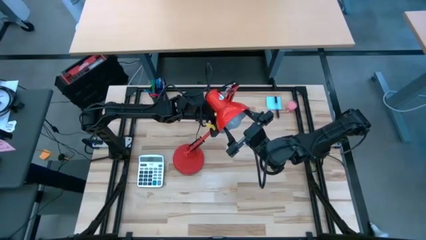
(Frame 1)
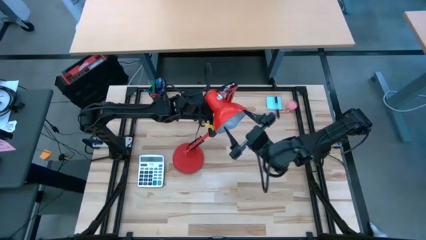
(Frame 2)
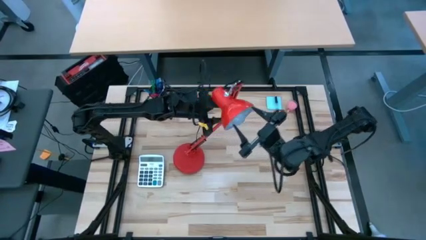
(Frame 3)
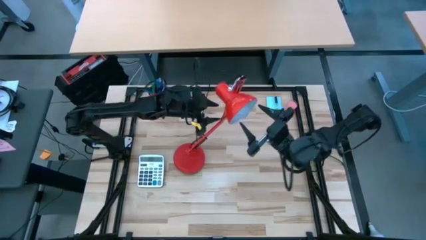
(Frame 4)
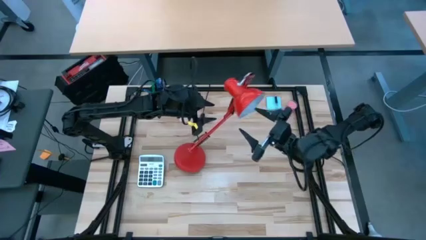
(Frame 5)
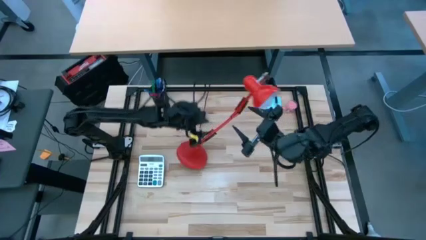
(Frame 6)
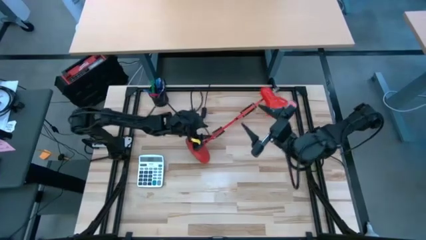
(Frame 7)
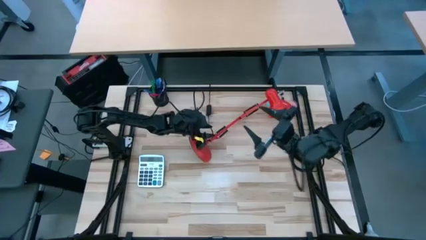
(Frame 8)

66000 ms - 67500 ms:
Task: Screw lightbulb
Insert the white lightbulb into the red desk lamp

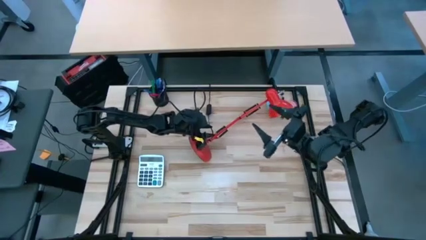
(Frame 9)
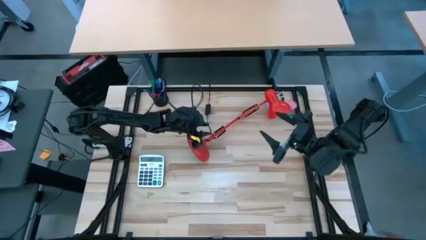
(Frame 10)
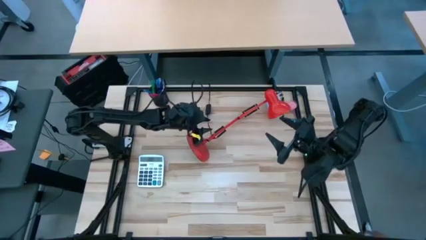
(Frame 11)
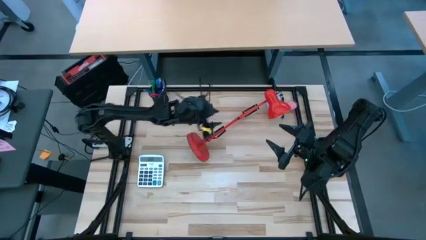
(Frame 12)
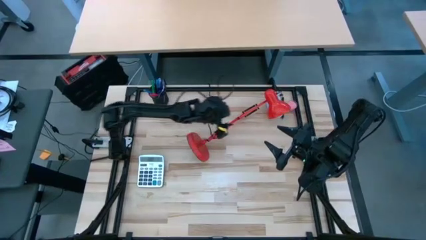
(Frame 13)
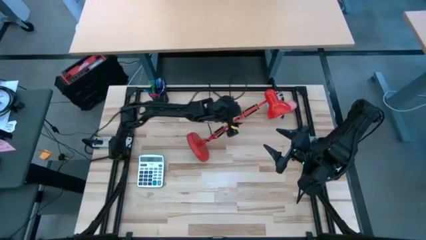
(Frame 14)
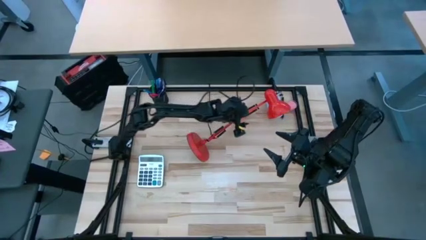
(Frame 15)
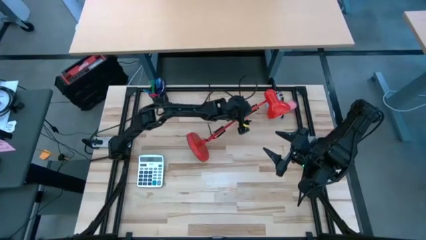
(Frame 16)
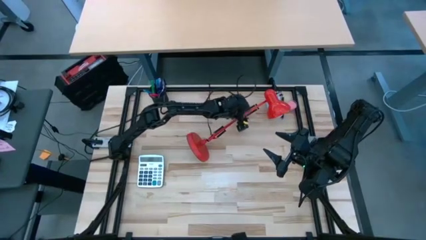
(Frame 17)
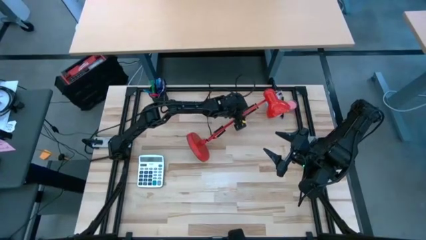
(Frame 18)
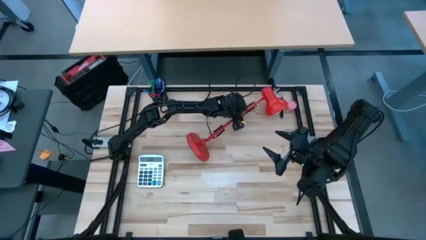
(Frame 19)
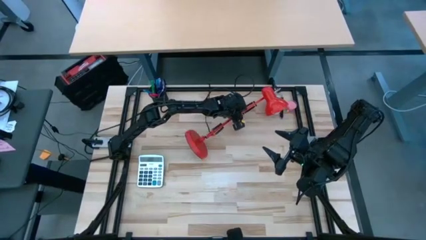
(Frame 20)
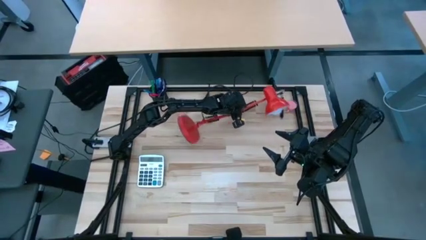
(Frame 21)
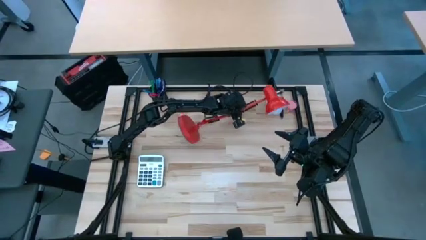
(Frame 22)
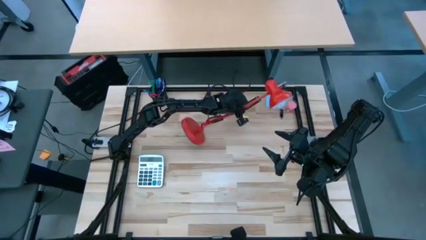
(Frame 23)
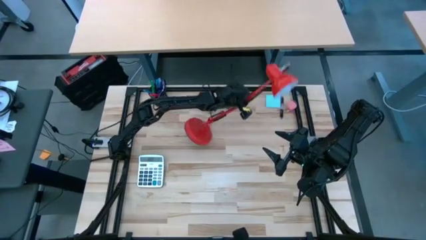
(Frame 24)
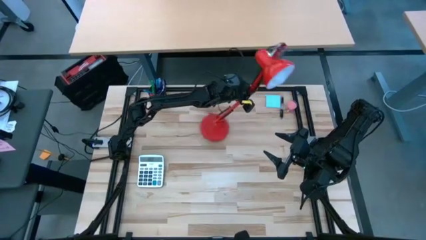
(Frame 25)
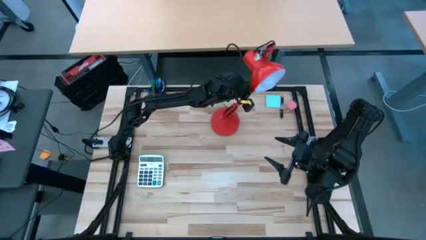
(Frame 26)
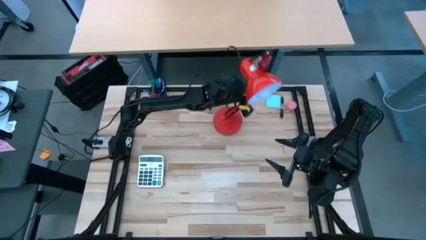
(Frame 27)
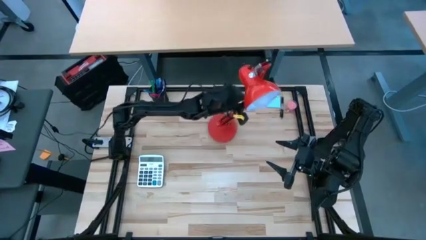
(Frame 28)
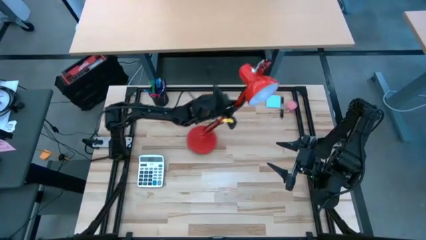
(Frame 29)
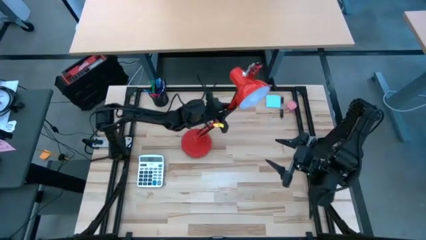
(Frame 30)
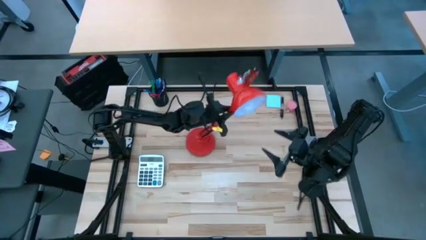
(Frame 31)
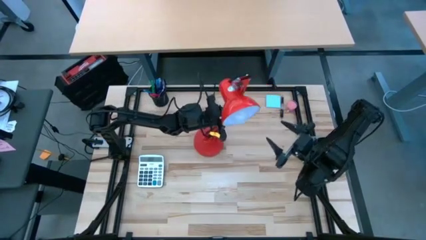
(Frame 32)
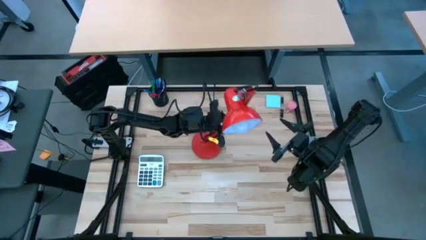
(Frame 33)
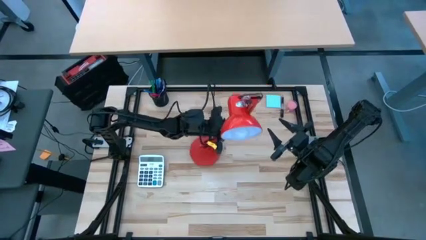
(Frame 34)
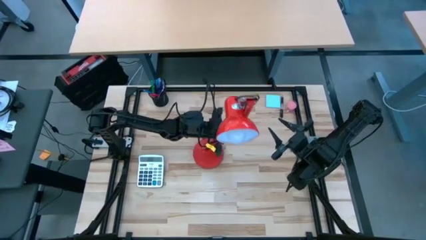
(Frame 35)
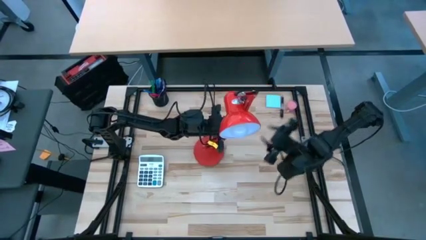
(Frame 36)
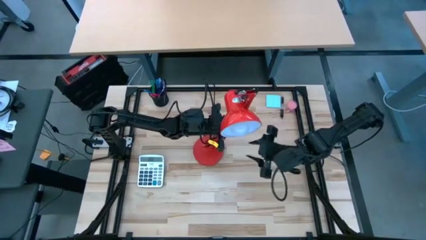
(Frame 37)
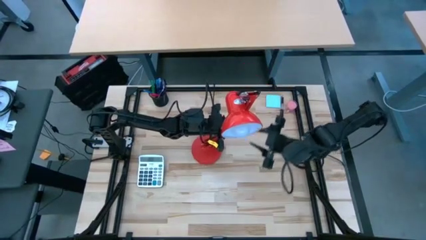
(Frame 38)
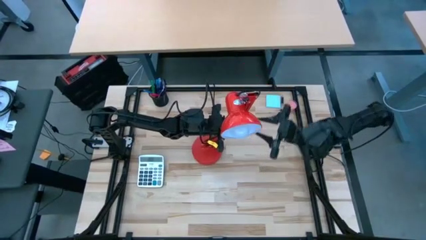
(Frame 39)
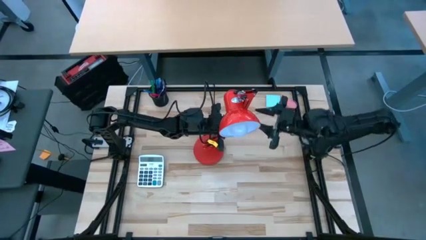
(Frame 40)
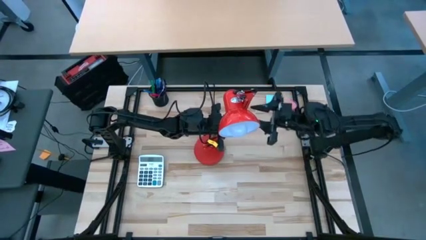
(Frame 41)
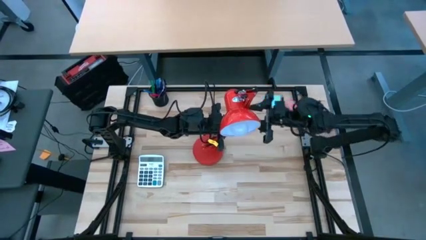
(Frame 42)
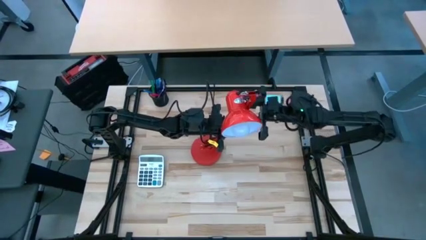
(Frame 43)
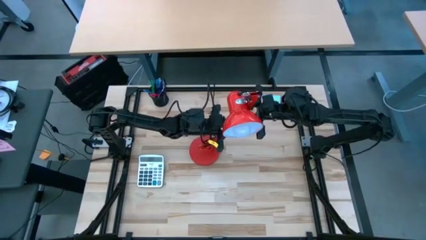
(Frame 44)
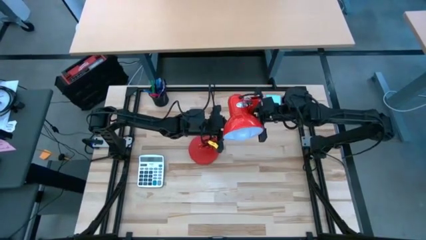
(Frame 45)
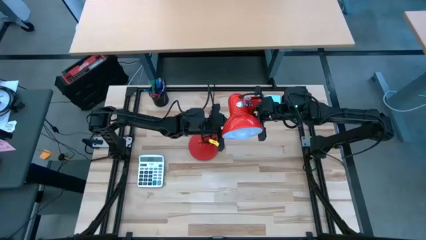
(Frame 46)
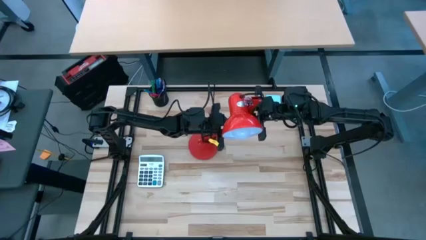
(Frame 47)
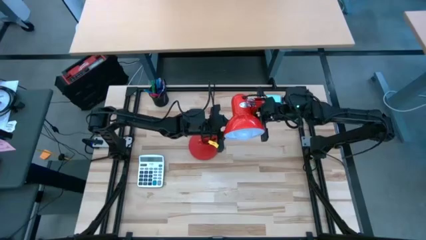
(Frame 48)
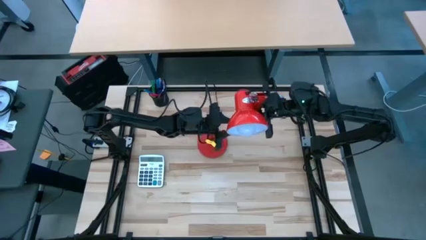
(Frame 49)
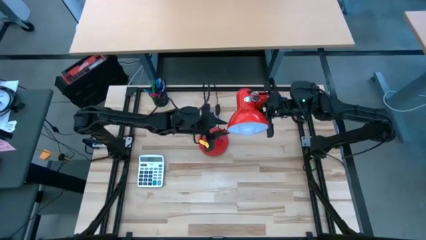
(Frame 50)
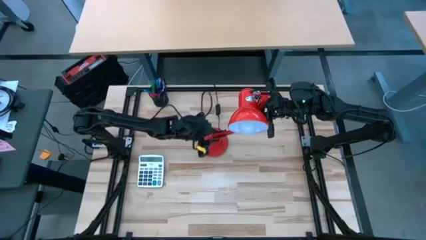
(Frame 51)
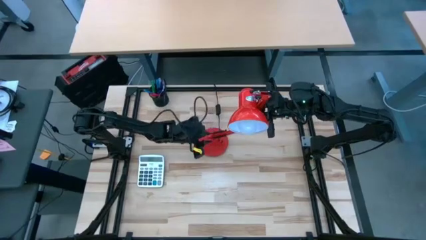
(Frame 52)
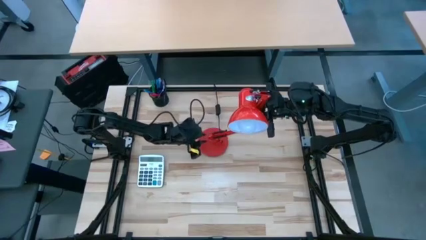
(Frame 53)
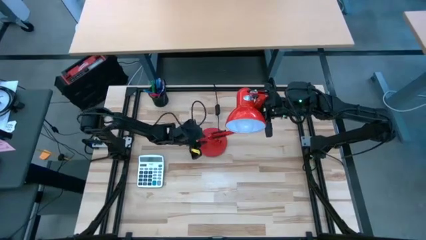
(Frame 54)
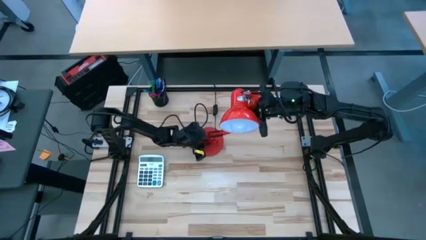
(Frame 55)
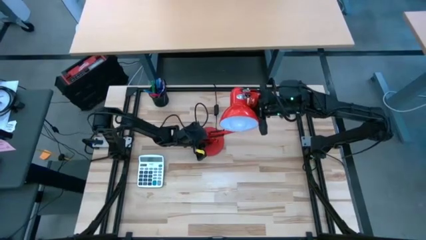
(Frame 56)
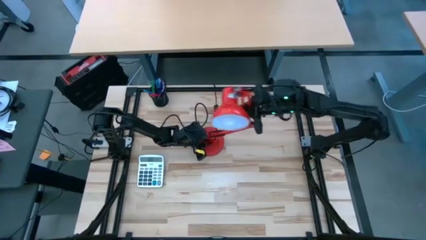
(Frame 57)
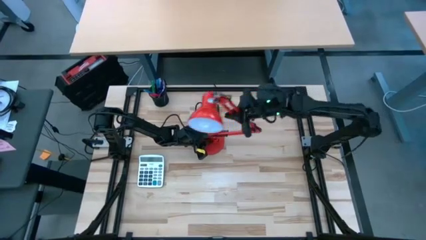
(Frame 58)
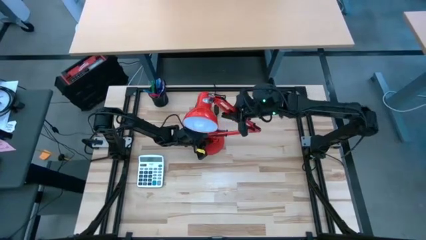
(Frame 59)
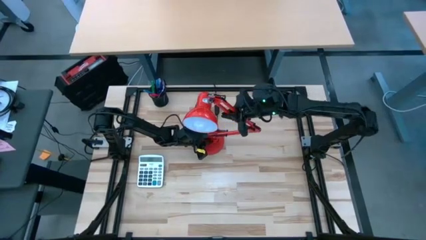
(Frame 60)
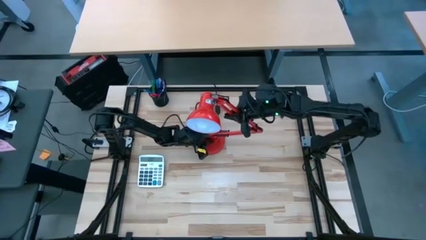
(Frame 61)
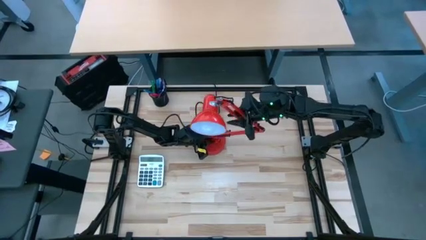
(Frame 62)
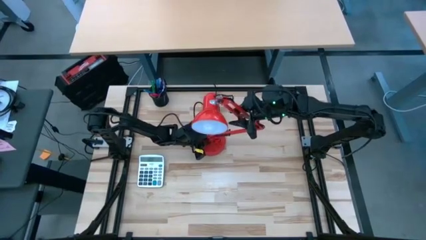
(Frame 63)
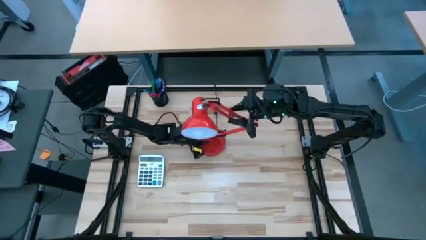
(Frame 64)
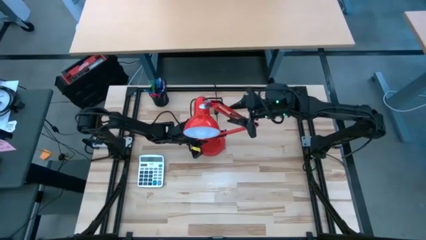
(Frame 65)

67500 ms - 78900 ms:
Insert the white lightbulb into the red desk lamp

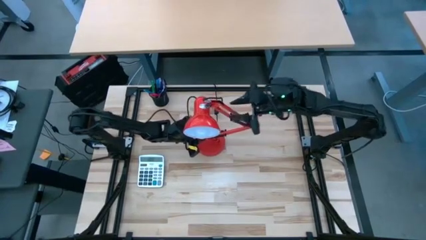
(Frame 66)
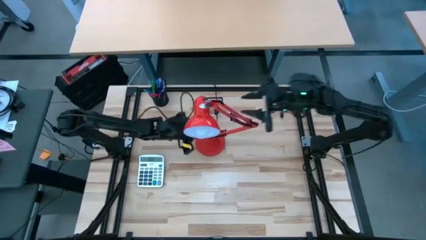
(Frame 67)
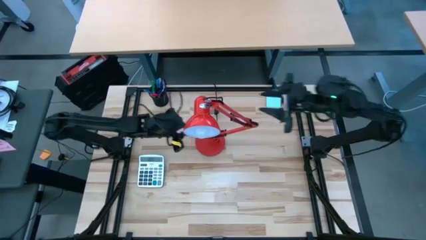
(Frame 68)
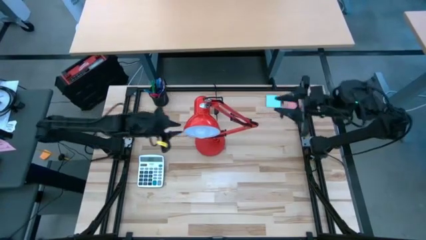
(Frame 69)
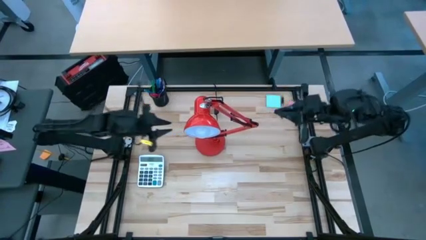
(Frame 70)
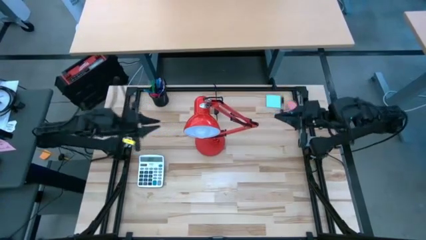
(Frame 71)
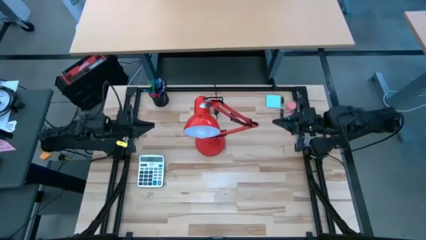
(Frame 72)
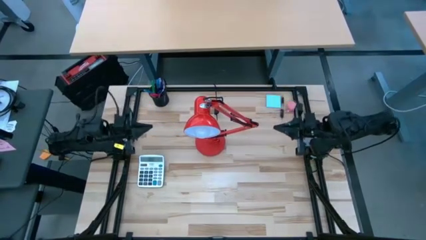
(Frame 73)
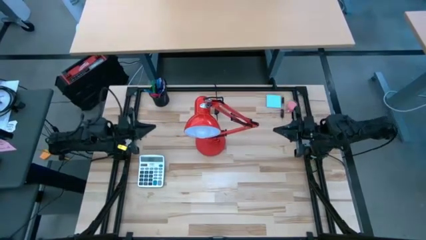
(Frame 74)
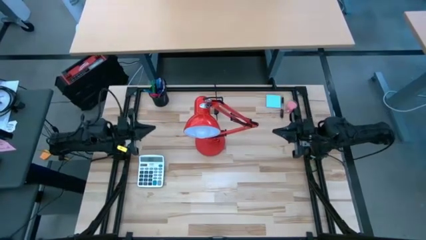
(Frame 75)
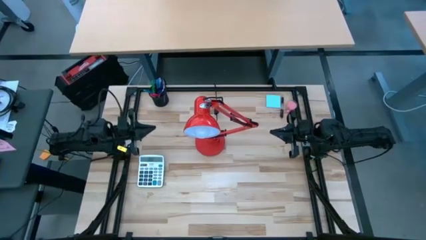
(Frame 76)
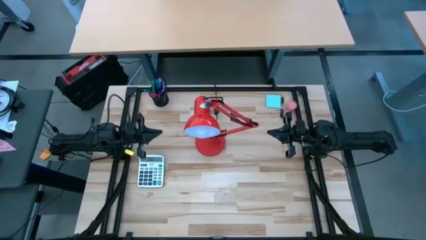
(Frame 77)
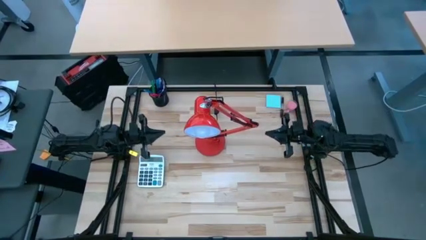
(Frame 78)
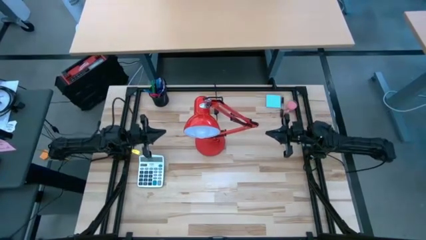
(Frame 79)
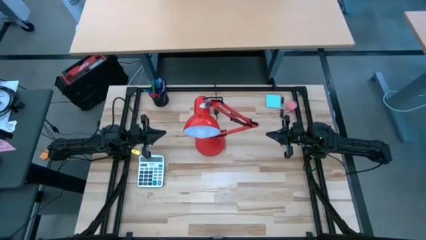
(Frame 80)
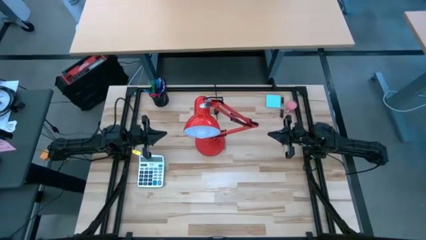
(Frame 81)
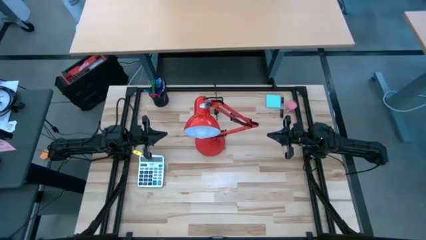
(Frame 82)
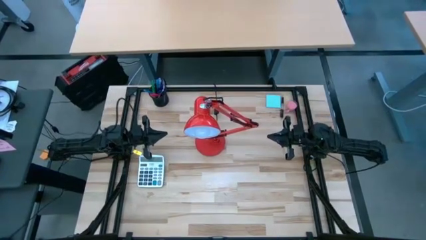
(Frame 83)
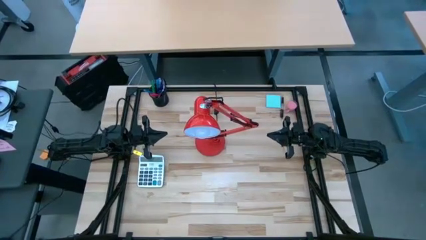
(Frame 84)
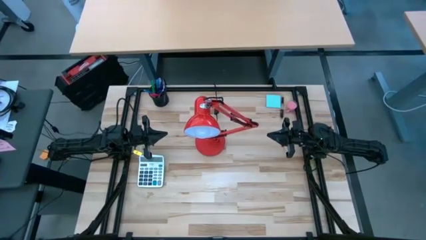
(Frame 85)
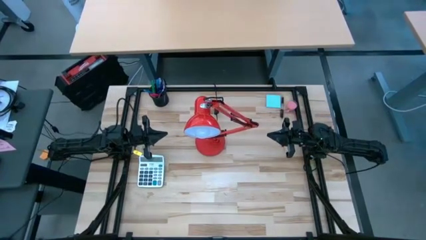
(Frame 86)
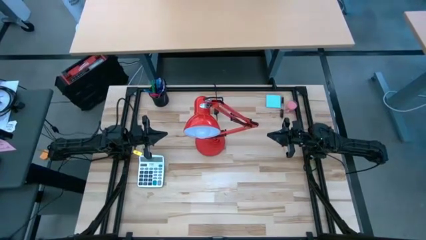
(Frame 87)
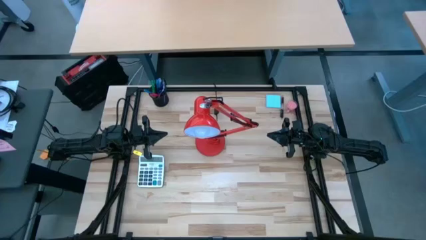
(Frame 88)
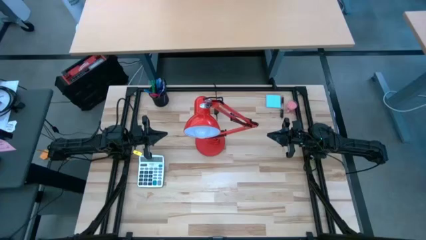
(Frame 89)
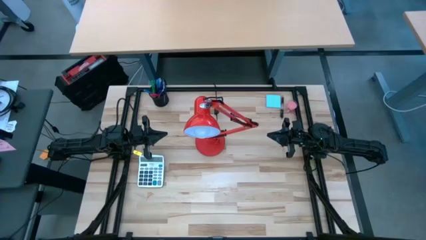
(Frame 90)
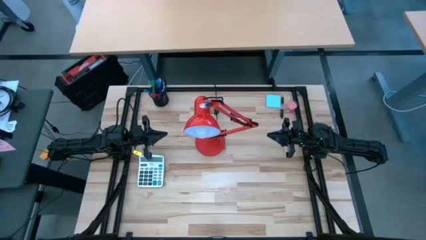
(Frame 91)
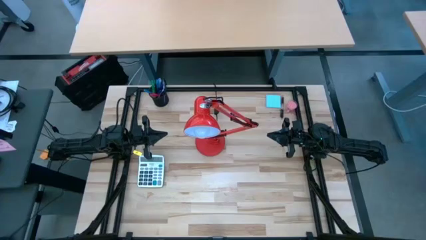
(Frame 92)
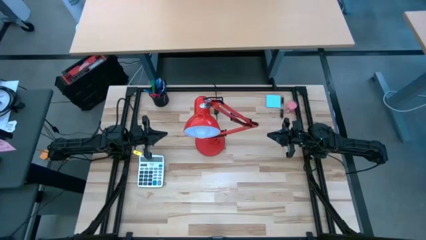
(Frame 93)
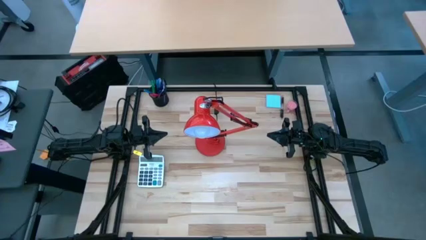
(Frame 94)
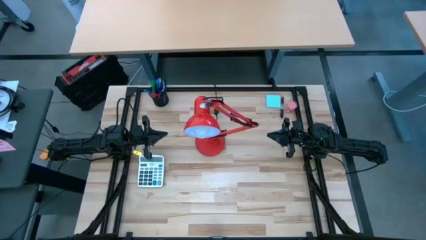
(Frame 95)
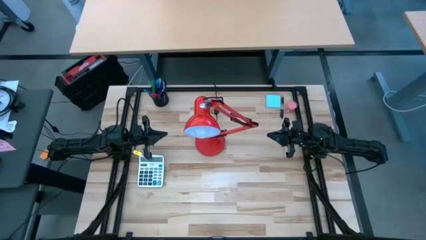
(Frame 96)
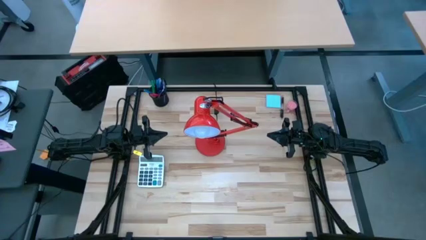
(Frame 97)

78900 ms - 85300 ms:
Return to Home Position
